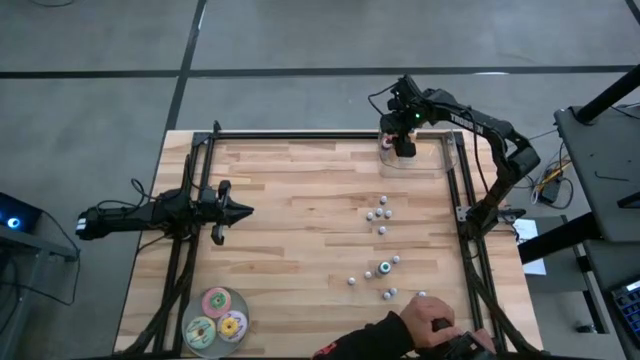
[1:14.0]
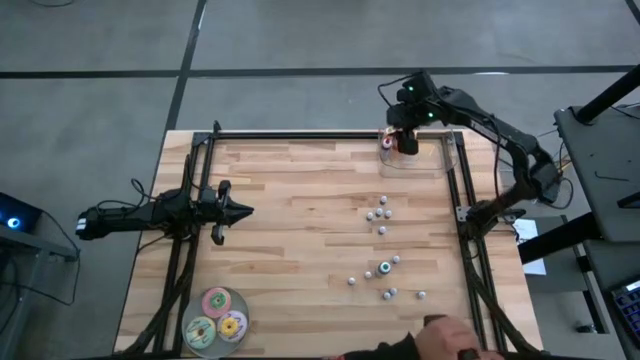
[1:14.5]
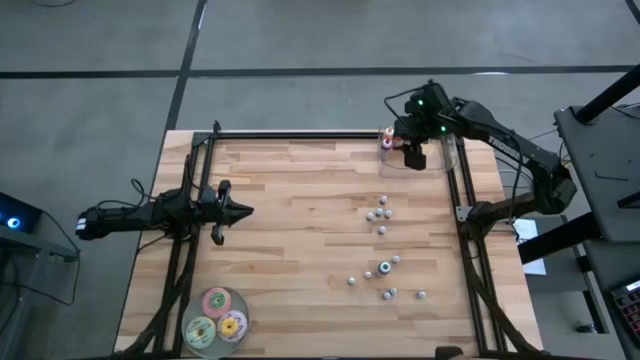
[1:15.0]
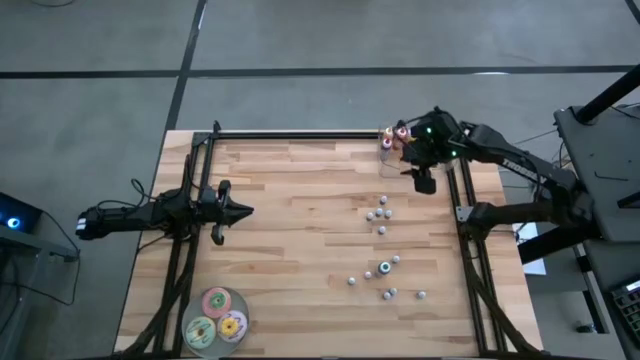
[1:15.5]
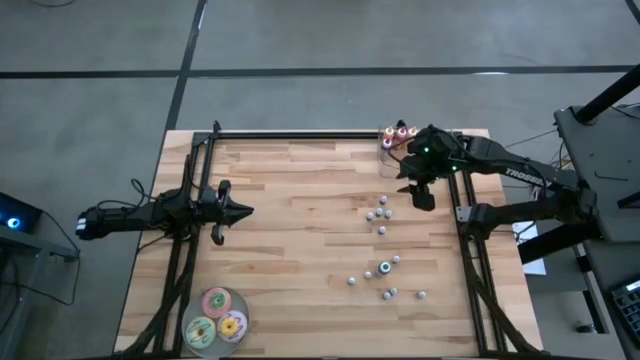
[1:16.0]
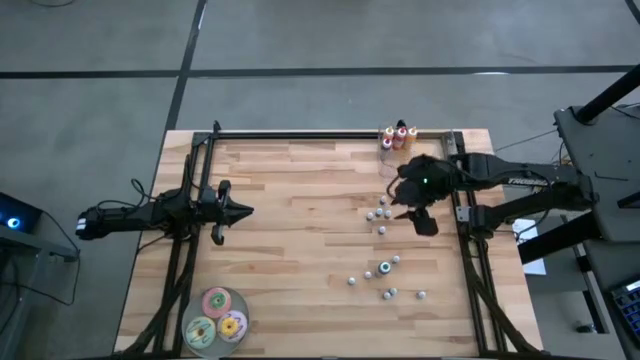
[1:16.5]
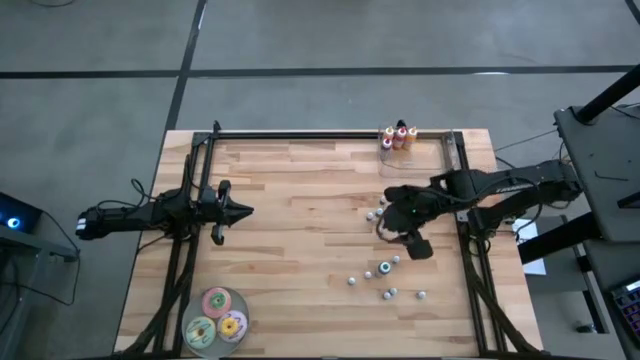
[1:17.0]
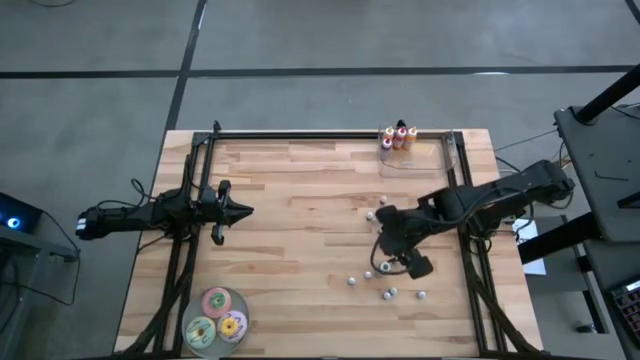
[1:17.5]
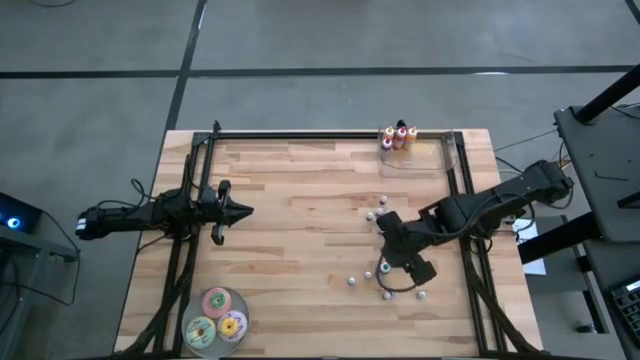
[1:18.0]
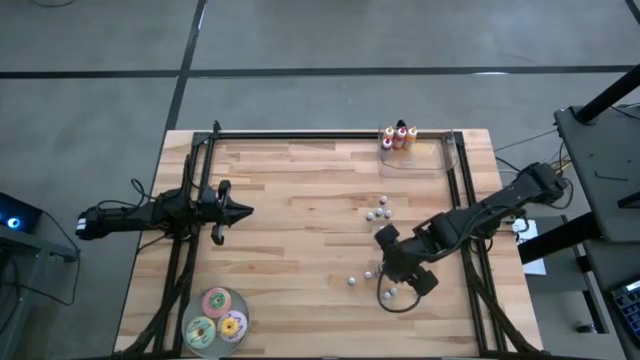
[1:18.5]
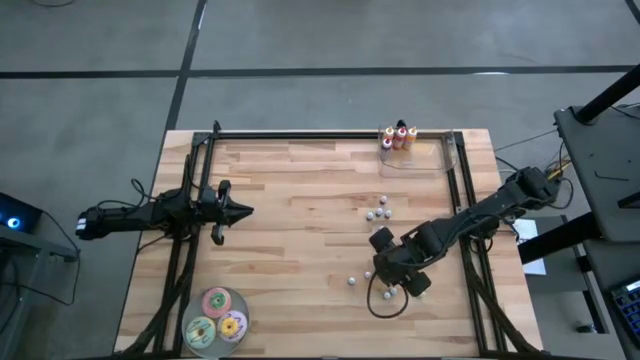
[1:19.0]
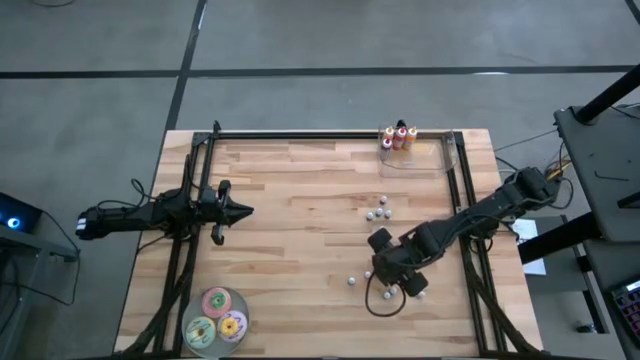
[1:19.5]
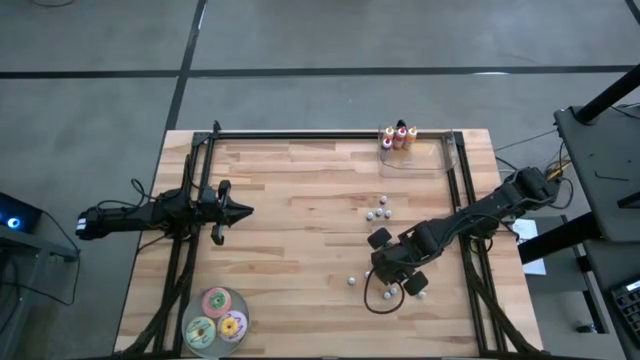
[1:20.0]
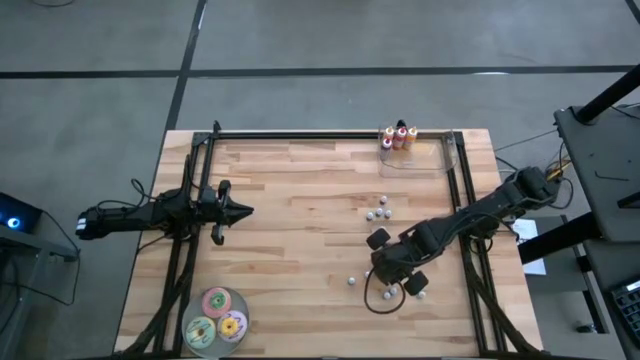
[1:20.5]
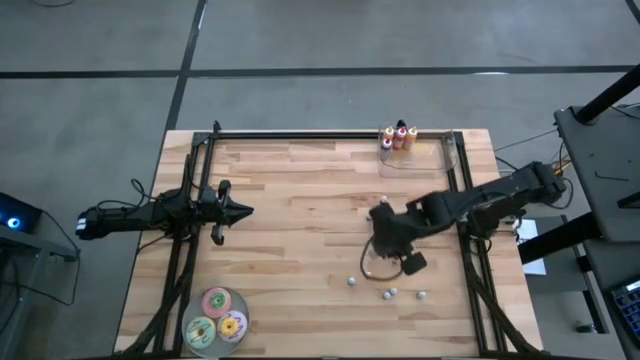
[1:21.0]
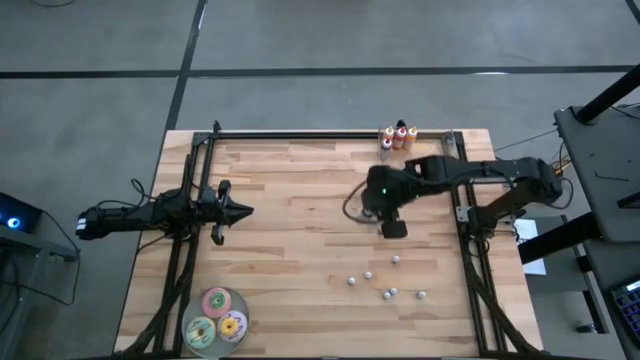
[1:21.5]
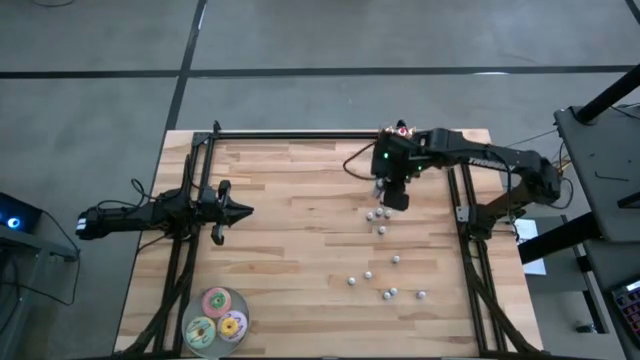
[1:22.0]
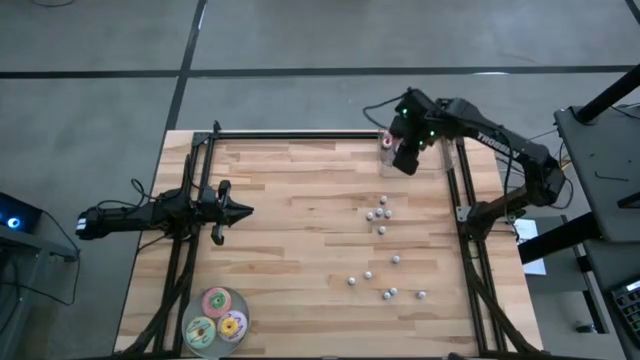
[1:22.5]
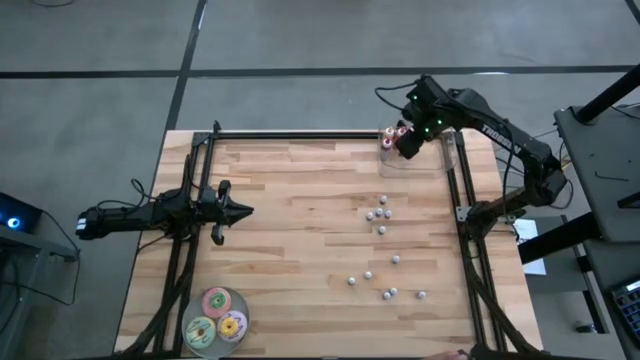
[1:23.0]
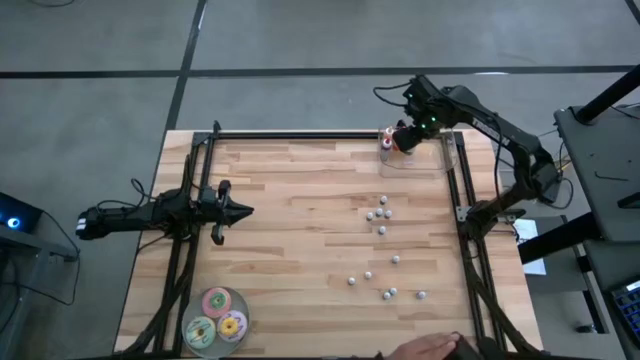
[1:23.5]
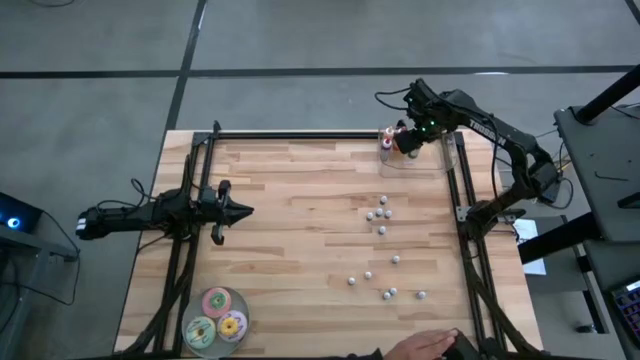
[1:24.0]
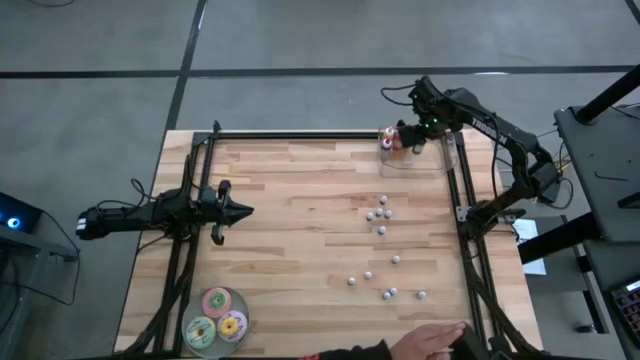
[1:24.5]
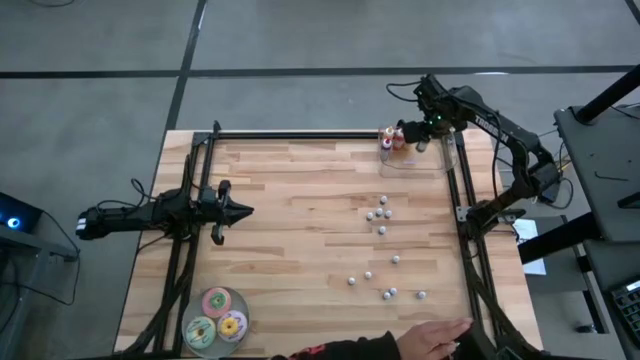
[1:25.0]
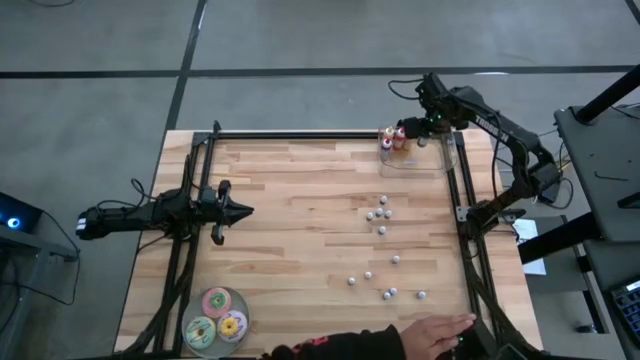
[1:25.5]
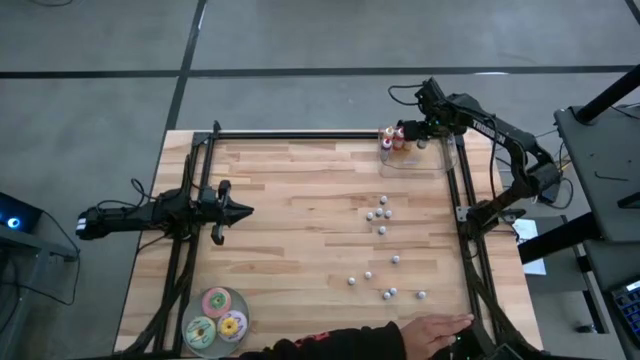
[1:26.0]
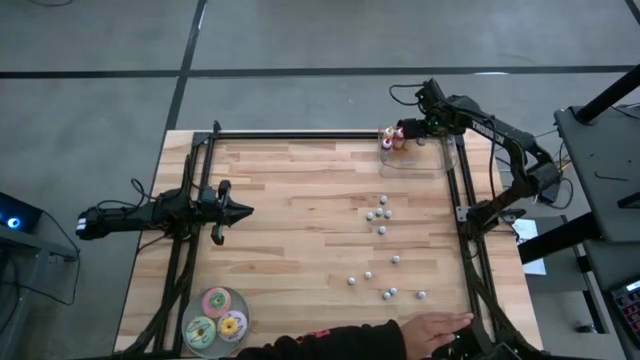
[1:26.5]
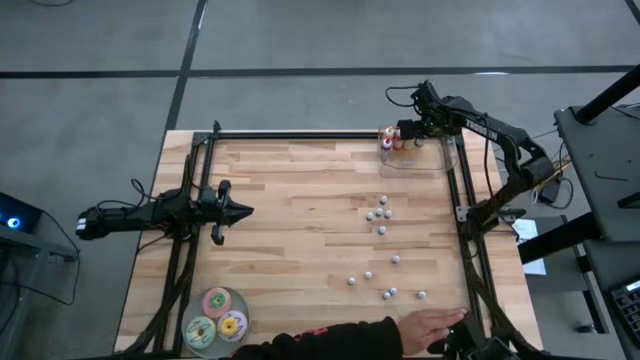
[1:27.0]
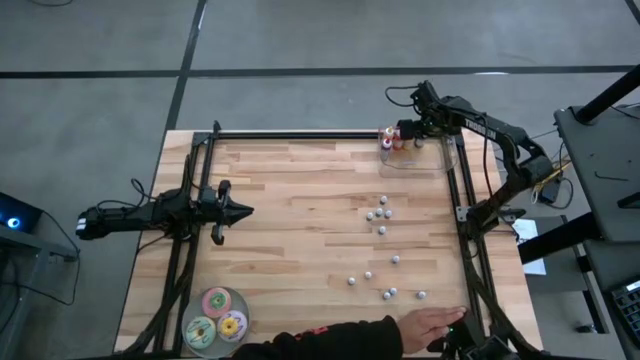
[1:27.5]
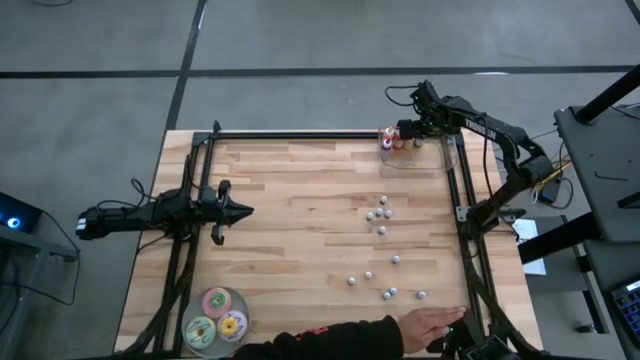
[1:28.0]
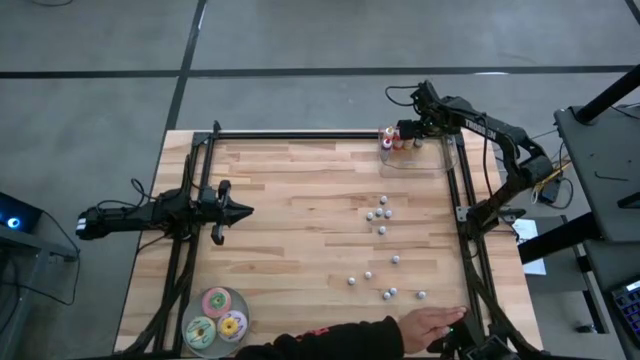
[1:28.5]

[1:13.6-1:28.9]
Task: Pick & Place food coloring
Put the big green food coloring bottle into the bin

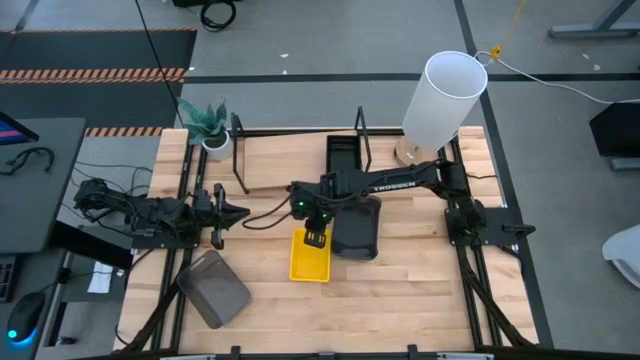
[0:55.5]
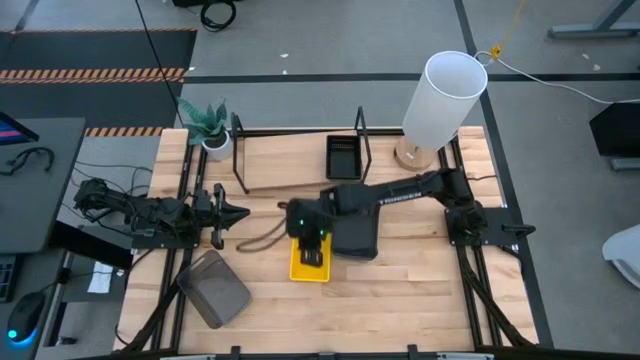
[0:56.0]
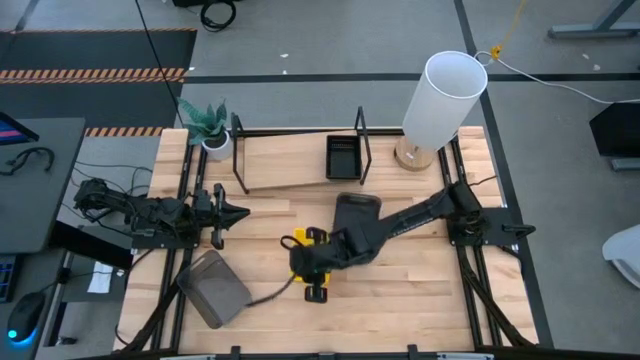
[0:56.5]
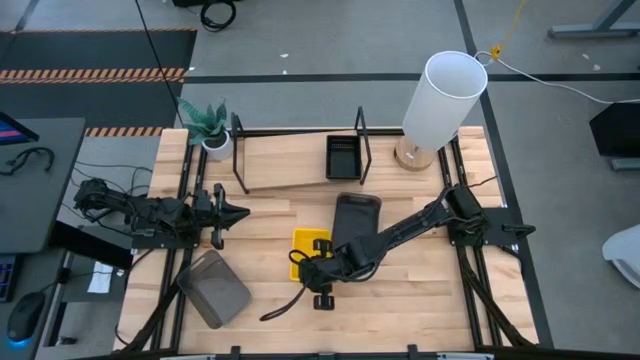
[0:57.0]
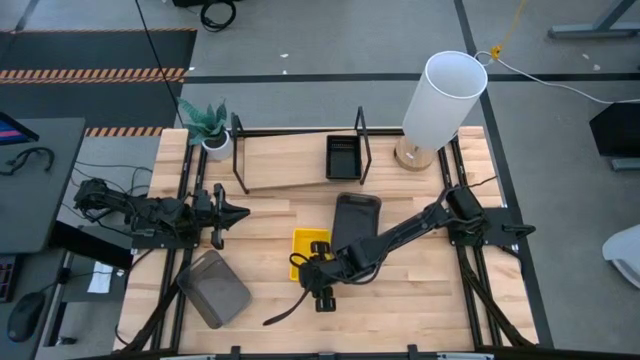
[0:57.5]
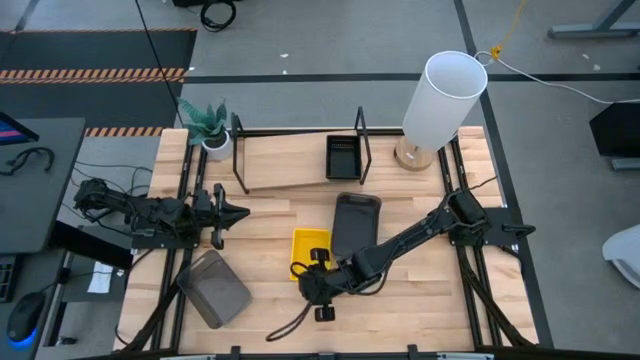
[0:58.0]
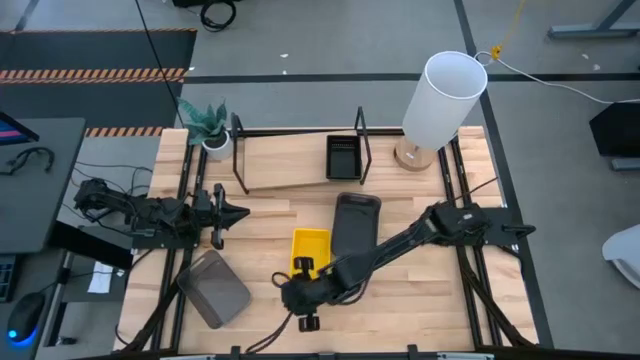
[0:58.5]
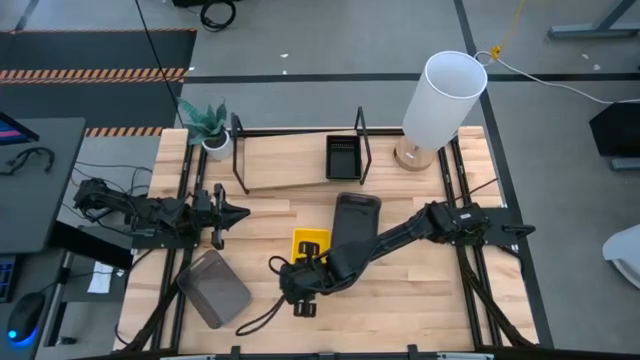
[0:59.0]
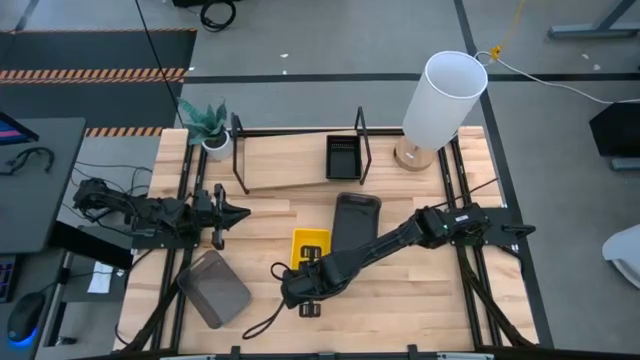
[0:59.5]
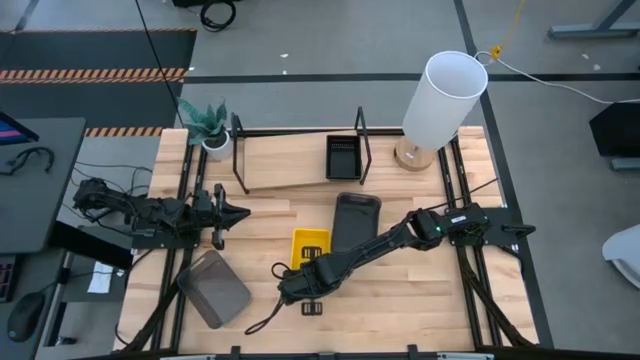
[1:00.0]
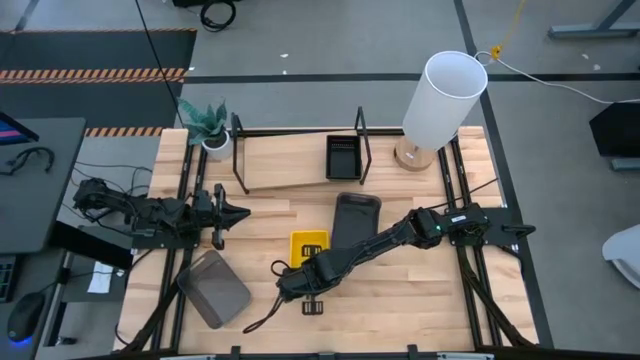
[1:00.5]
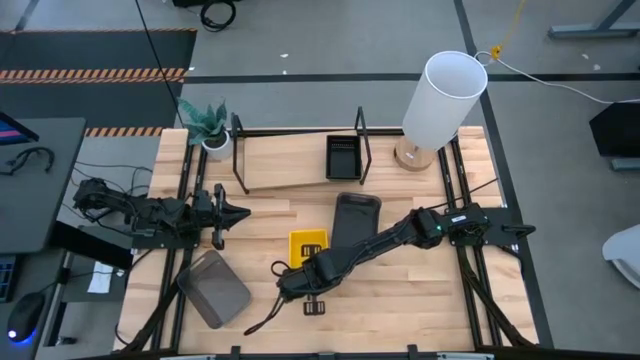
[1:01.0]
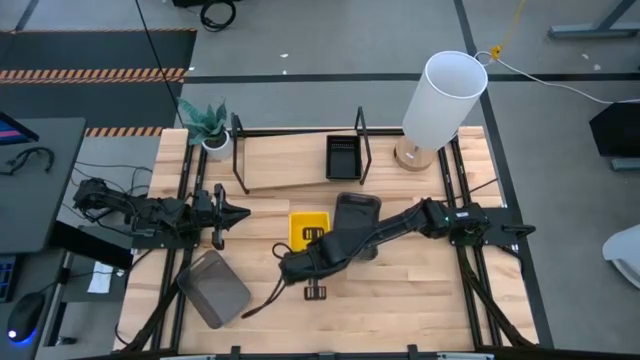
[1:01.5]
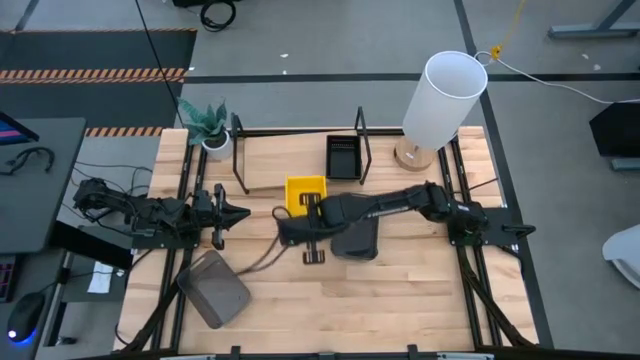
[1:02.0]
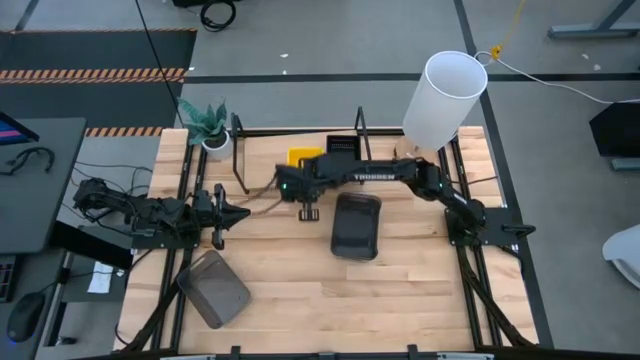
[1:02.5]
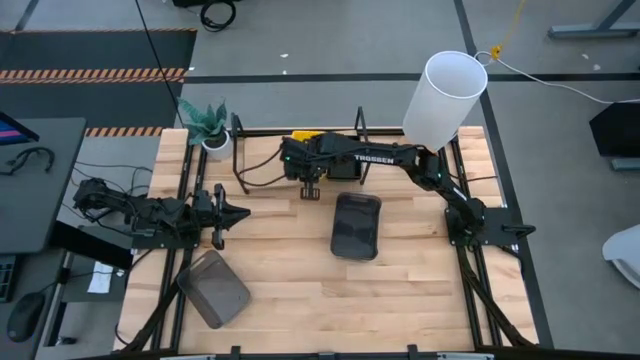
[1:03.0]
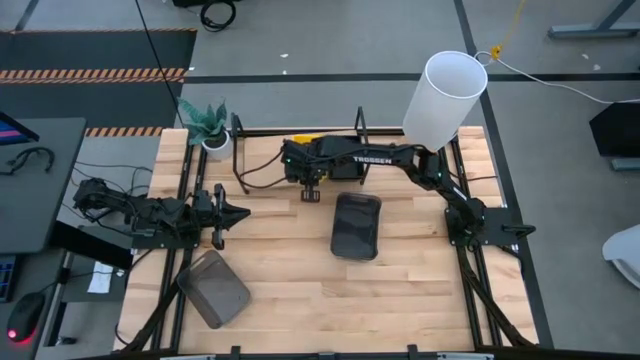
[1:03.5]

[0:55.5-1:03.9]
Task: Stack baskets on shelf by color
Put the stacked yellow bins on the shelf
